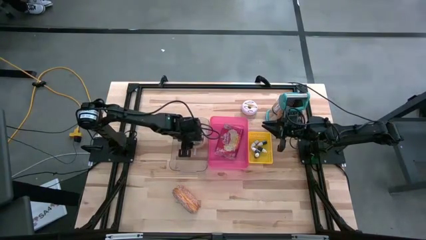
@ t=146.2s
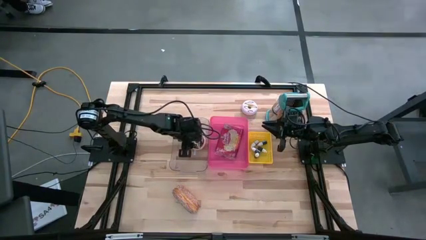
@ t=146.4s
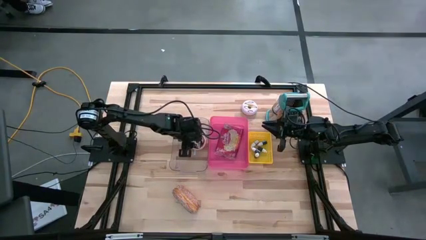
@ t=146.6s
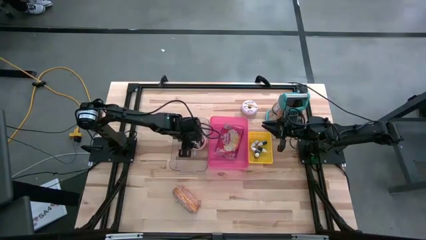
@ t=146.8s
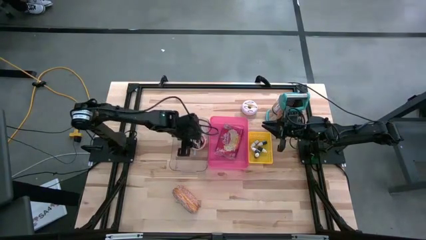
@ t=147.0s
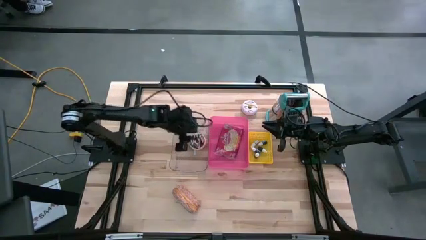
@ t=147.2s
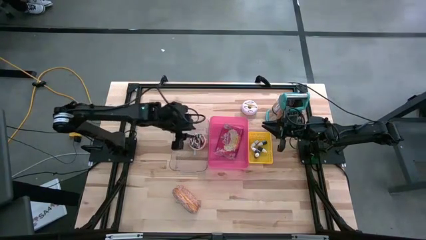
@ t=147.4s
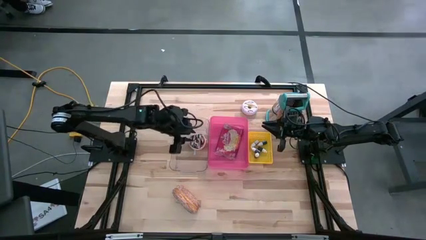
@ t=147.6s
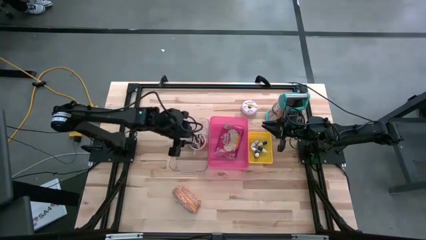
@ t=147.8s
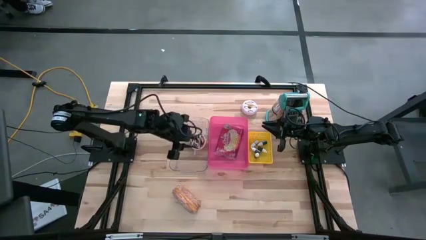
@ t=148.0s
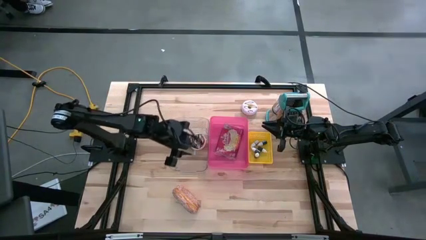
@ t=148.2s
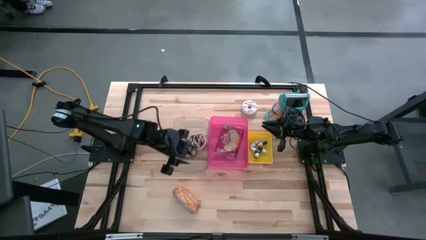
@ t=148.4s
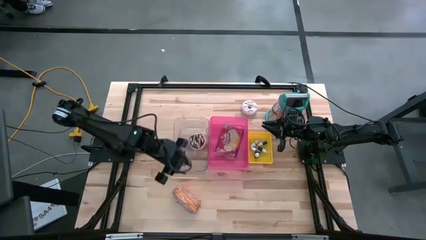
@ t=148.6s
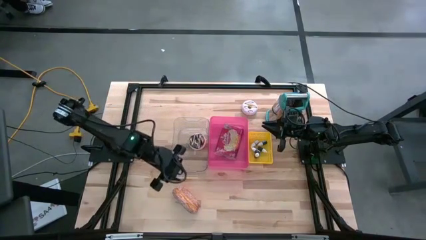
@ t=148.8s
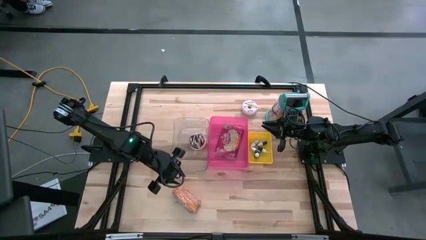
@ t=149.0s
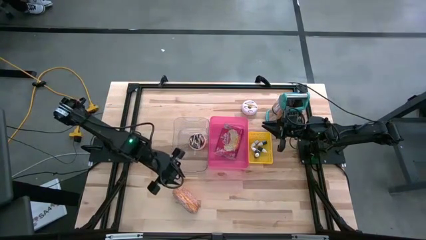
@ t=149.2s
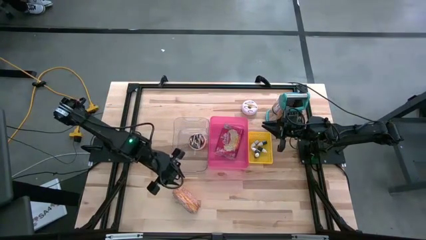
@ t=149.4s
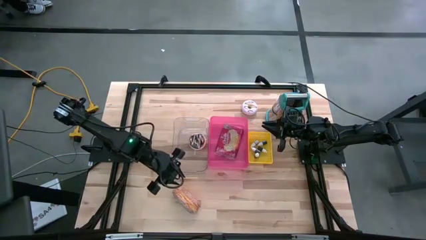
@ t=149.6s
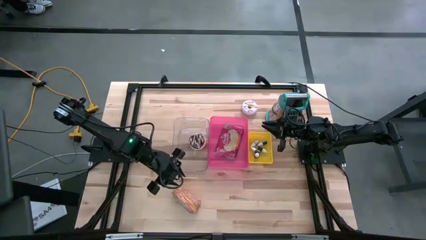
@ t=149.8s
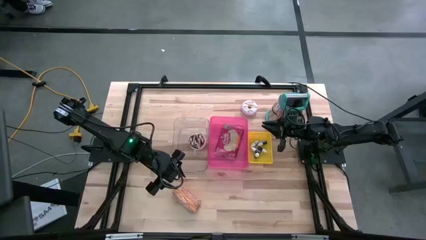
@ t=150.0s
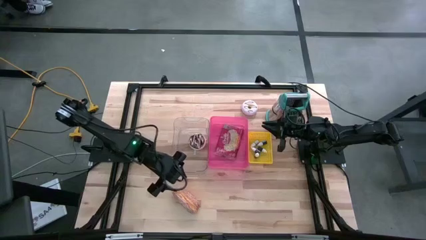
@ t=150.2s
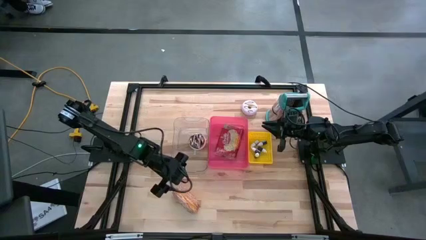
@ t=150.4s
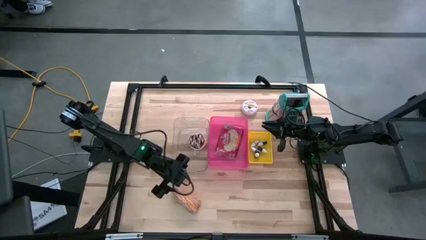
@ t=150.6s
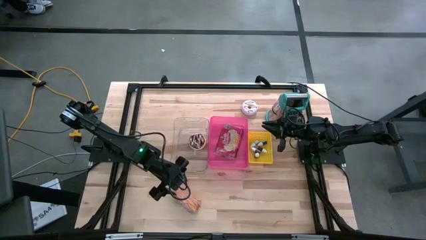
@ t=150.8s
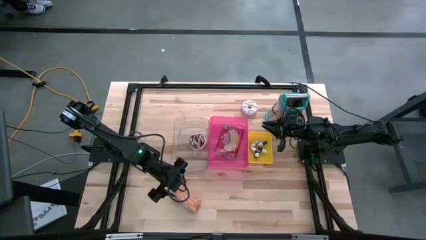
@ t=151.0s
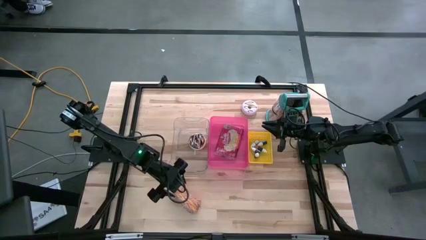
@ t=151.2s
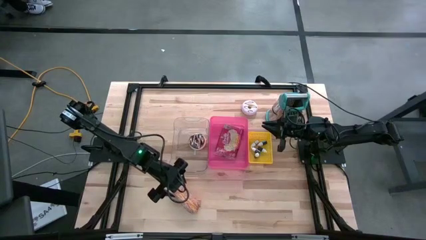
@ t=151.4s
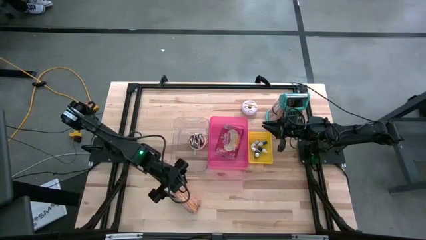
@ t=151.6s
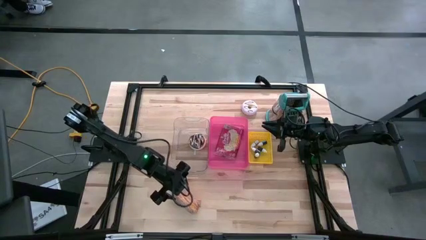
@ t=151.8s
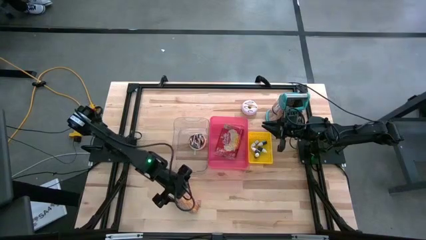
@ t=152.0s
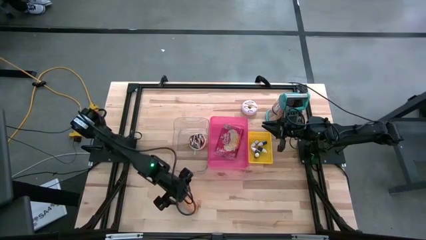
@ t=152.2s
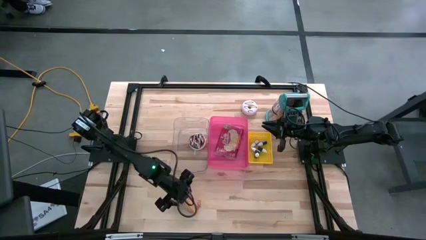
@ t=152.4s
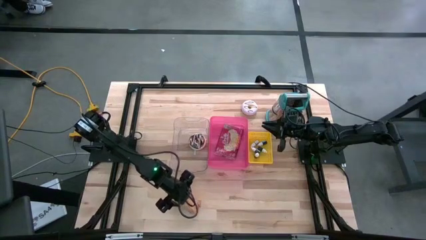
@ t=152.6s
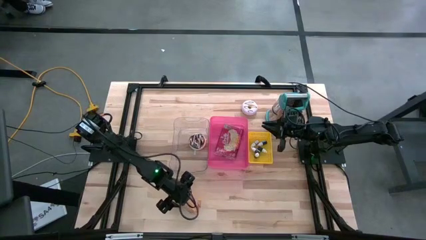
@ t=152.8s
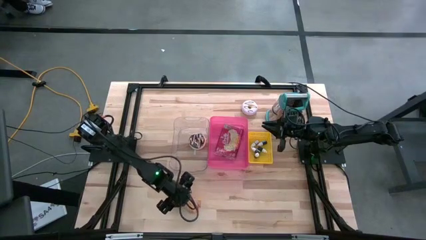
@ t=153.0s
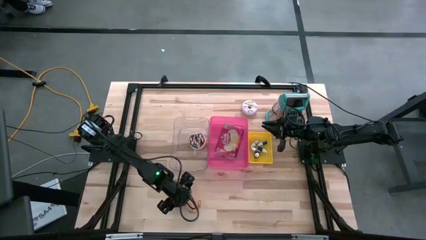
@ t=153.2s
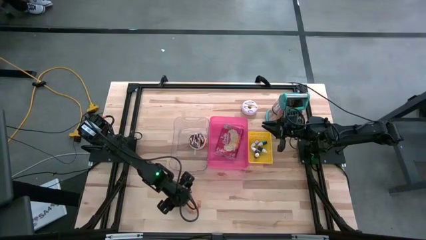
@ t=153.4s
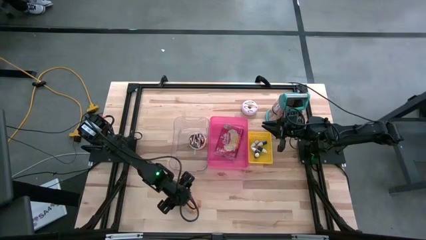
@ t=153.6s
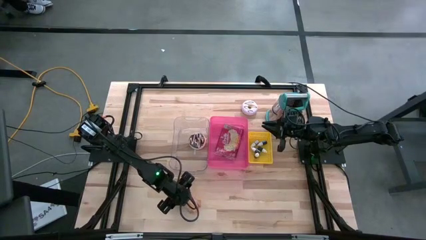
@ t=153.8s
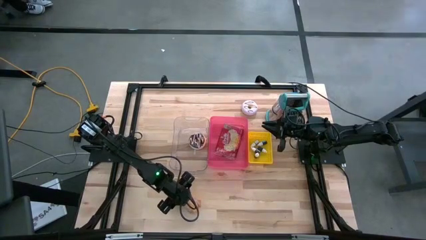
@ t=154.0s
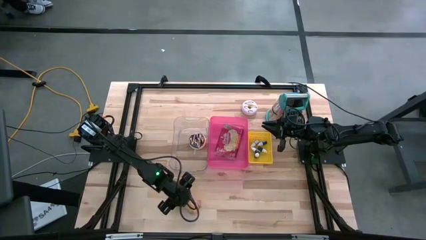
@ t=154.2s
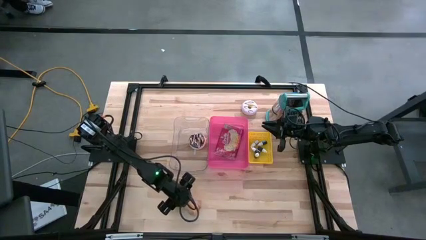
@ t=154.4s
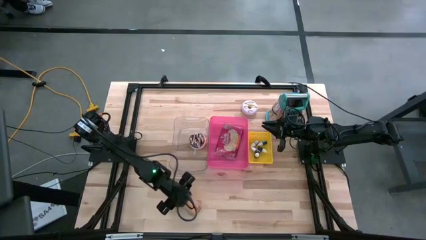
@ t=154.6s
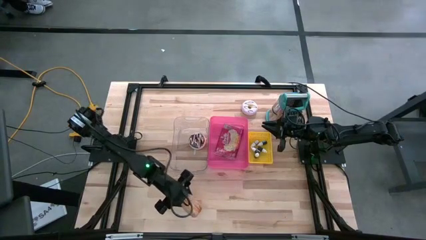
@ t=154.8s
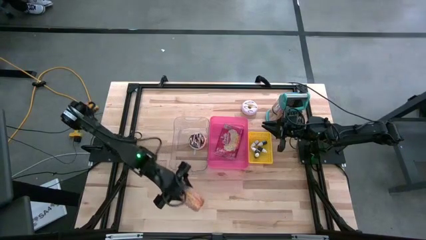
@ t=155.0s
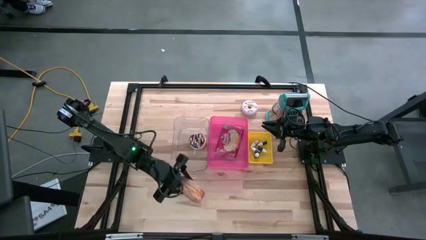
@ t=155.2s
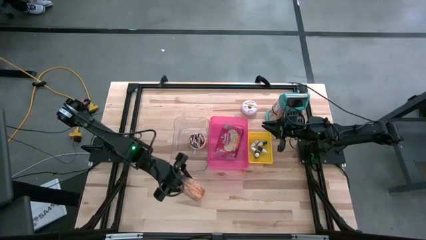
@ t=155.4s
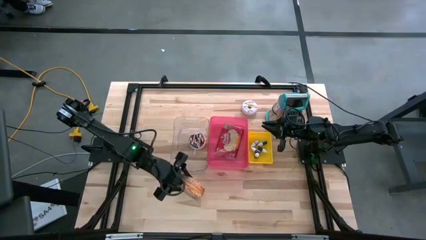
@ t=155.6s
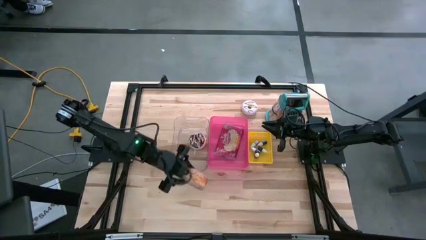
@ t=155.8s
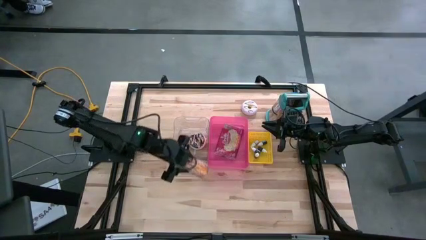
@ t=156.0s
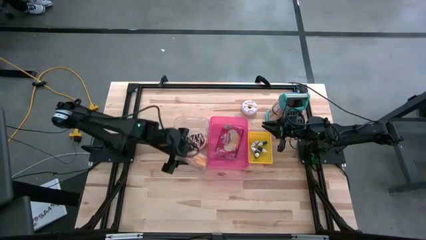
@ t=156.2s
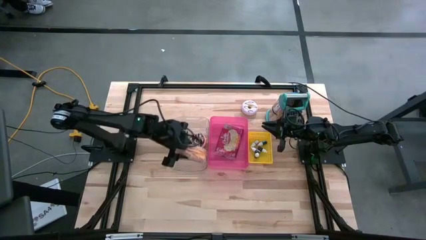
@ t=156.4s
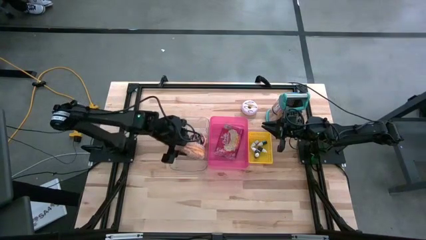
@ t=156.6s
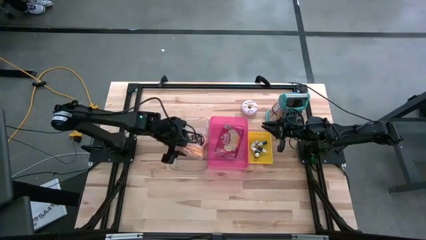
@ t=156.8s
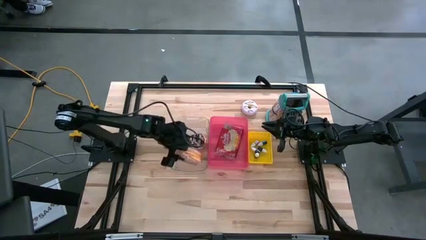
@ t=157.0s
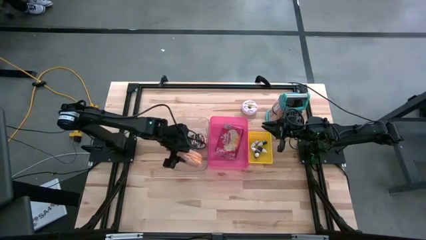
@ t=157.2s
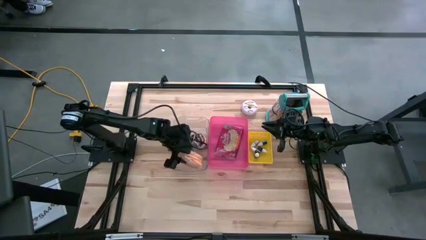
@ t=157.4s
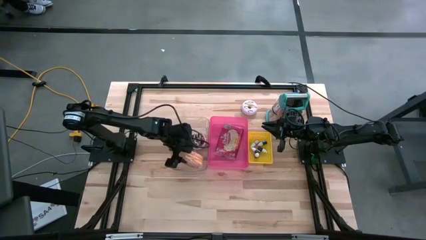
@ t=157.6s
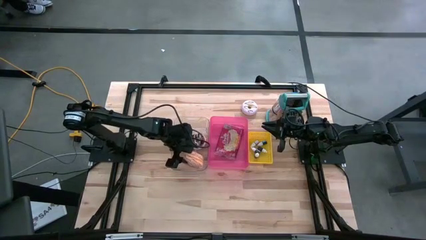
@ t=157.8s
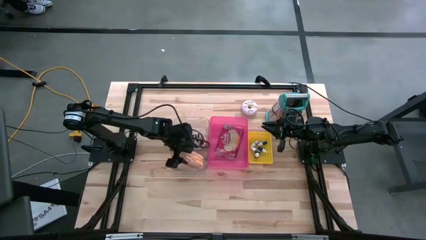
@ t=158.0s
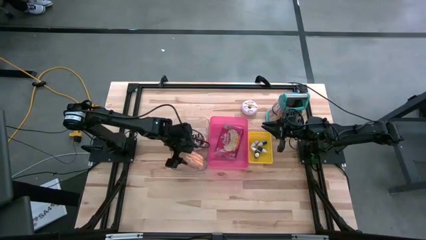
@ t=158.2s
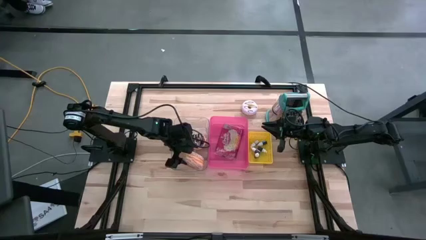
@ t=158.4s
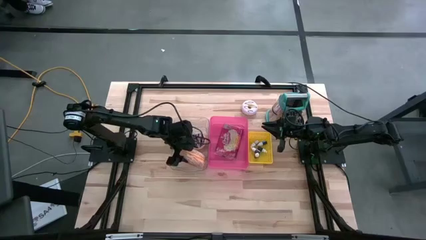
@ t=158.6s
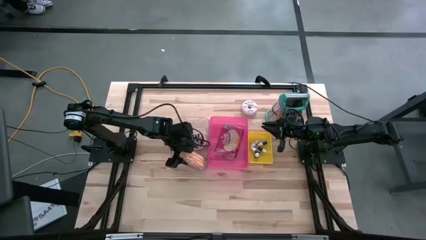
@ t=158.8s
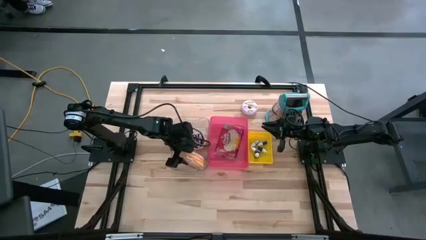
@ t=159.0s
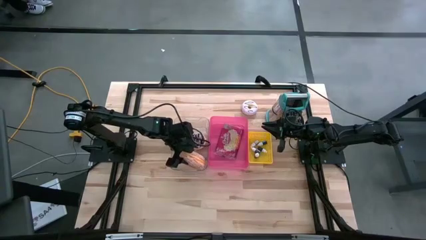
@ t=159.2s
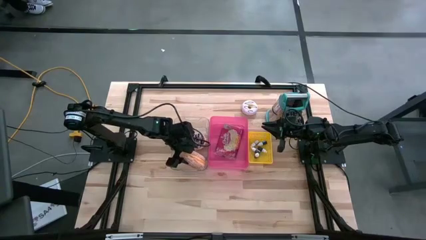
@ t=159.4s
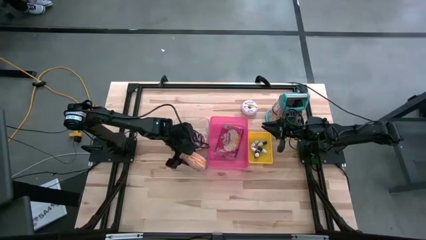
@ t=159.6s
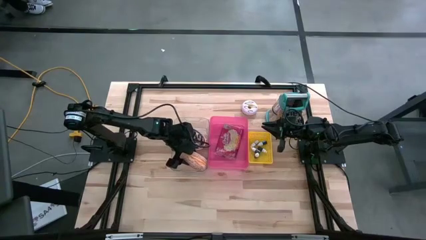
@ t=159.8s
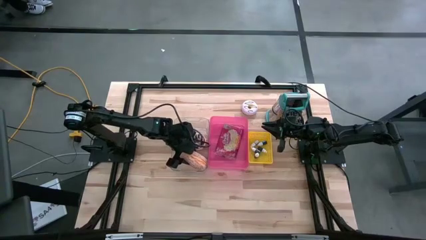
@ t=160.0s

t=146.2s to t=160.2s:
Put the brown donut into the transparent bin
